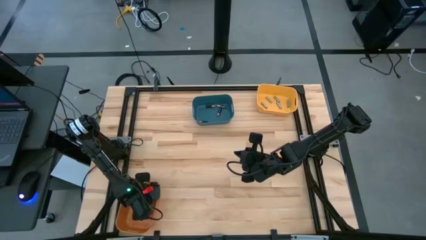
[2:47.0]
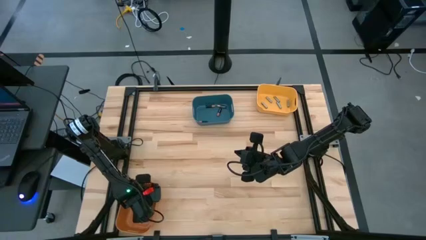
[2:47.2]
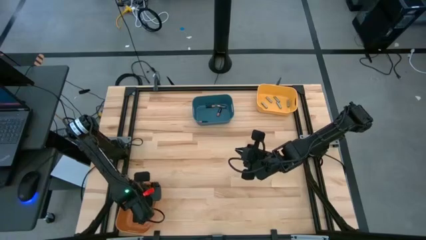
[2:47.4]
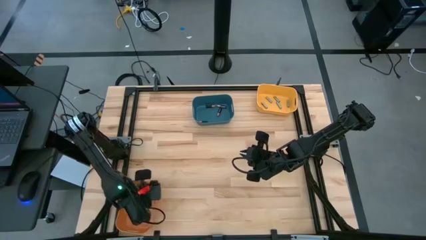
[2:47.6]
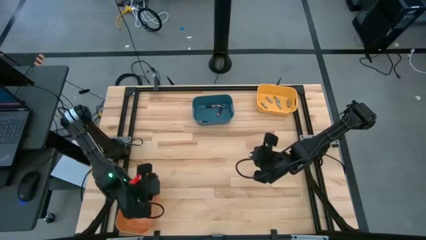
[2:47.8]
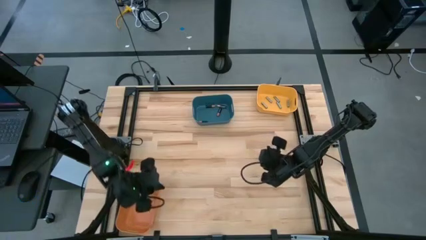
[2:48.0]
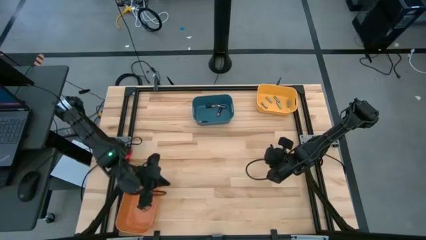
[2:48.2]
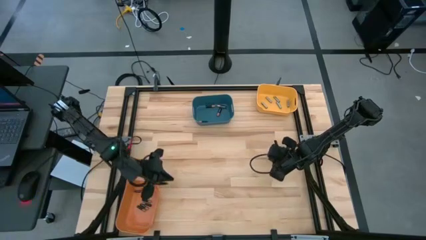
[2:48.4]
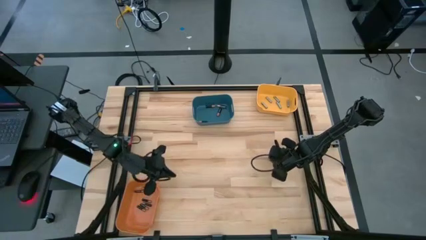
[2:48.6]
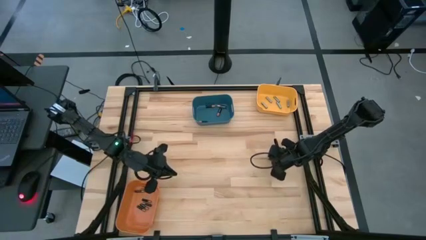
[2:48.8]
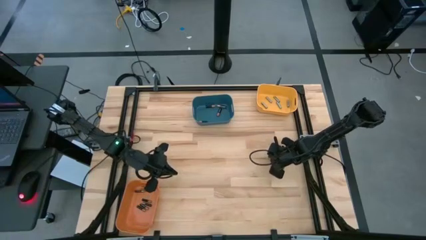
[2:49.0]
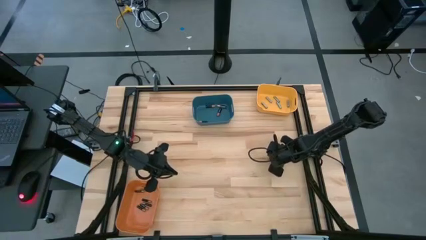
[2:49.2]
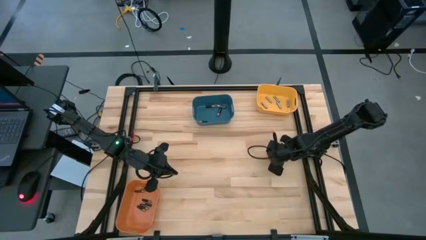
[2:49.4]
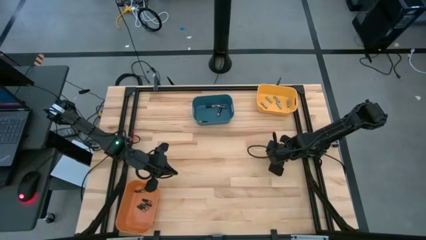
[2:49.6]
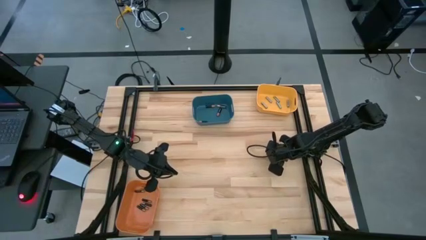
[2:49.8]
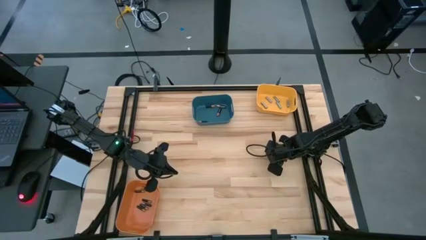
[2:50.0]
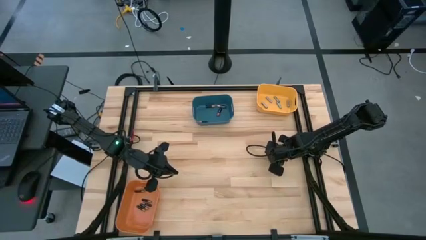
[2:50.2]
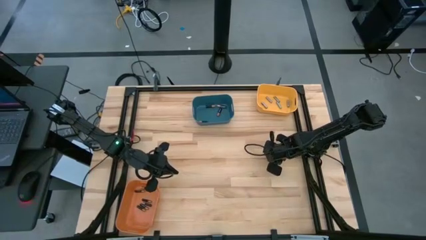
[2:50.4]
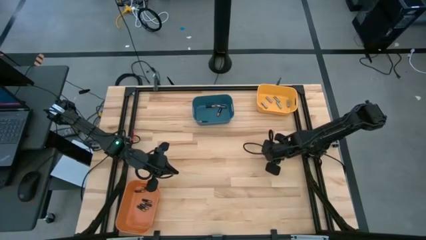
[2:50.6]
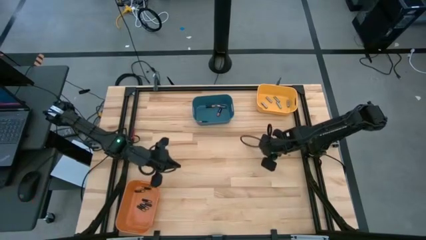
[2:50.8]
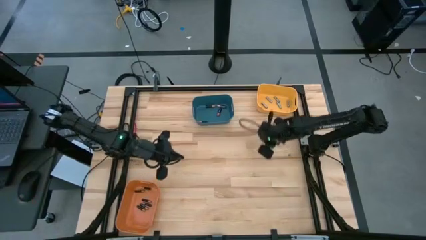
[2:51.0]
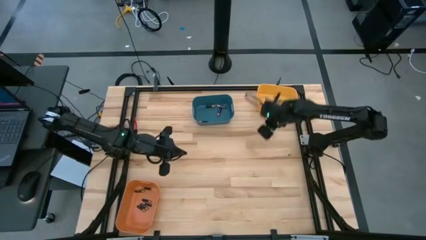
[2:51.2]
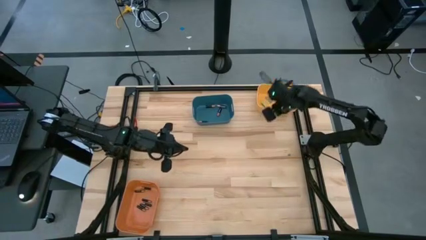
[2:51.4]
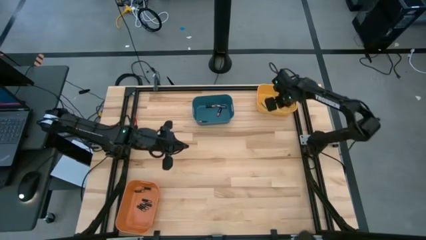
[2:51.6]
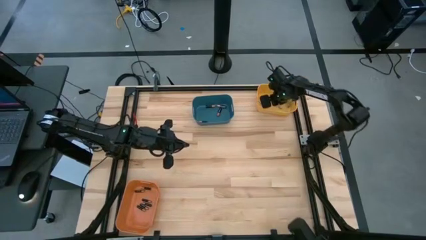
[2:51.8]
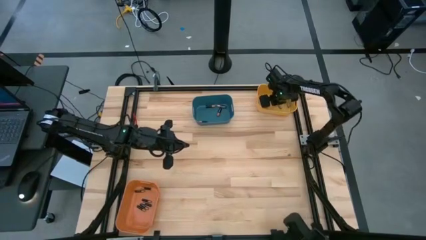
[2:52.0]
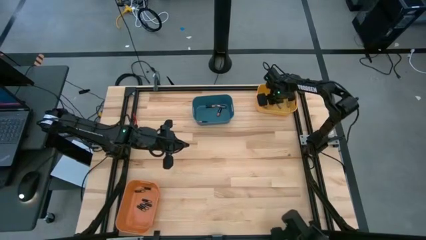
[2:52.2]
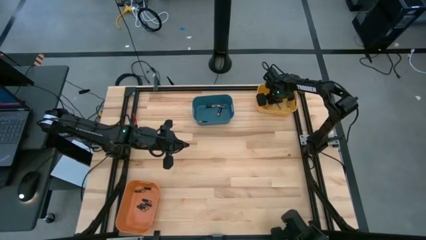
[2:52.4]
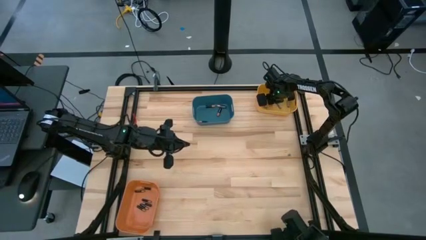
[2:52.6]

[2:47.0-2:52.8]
Task: Sort batteries
Put the white battery into the yellow bin

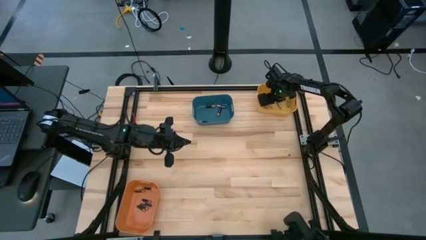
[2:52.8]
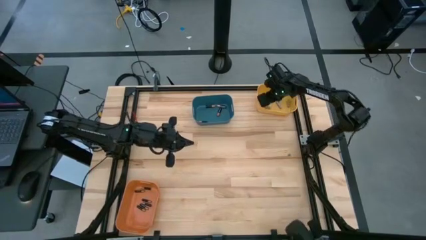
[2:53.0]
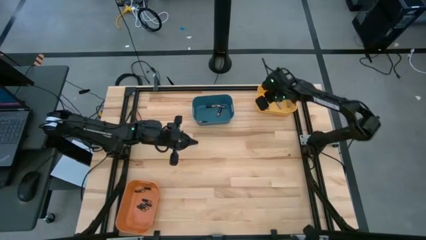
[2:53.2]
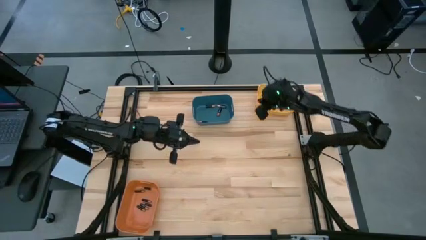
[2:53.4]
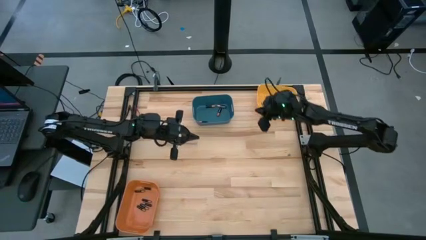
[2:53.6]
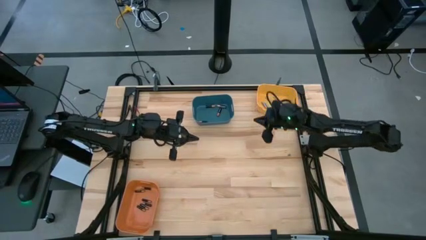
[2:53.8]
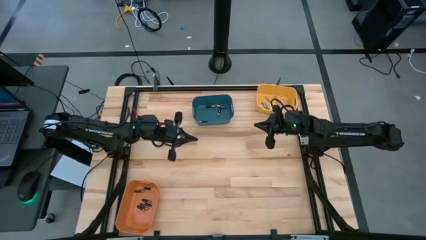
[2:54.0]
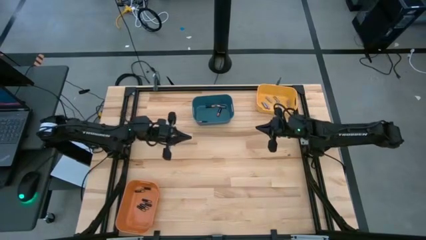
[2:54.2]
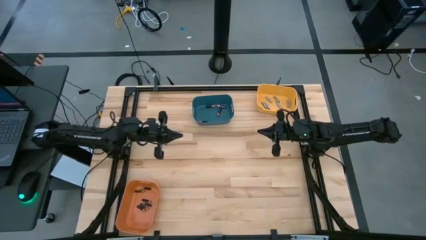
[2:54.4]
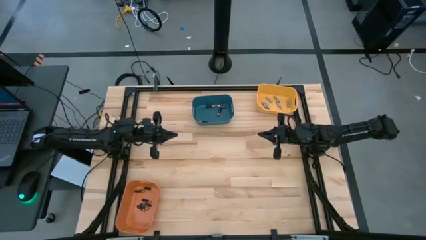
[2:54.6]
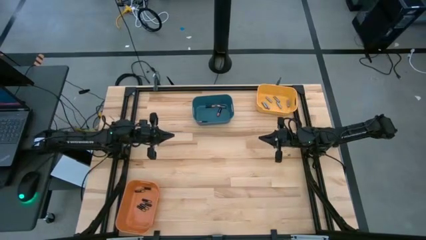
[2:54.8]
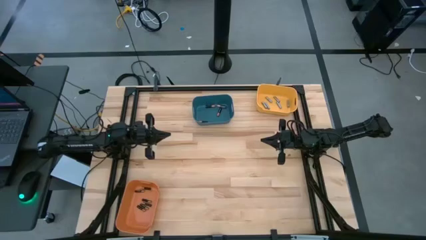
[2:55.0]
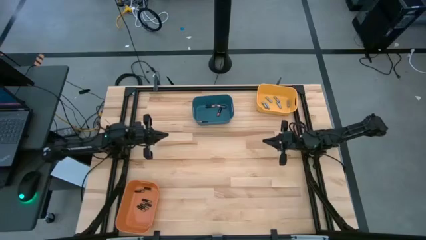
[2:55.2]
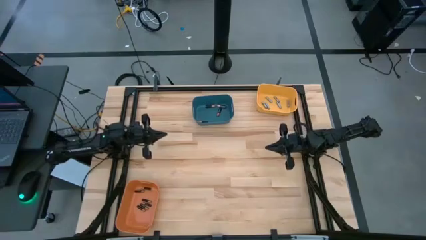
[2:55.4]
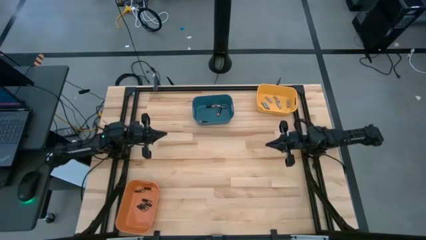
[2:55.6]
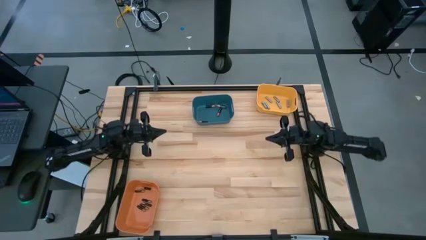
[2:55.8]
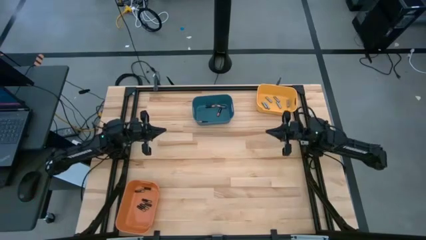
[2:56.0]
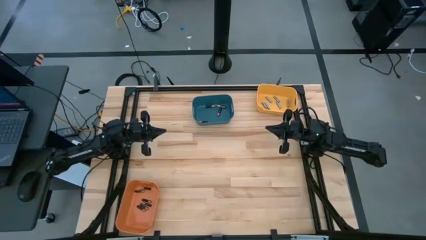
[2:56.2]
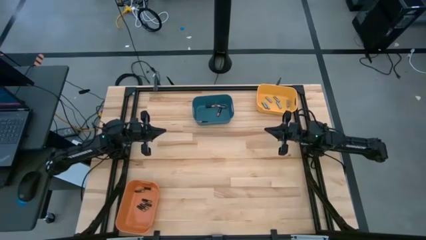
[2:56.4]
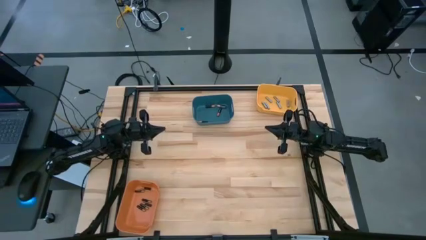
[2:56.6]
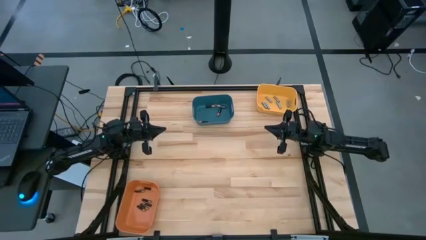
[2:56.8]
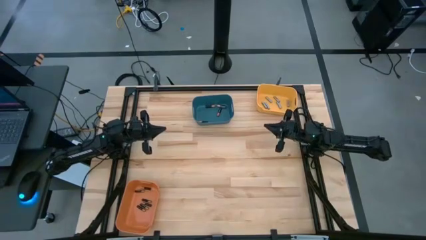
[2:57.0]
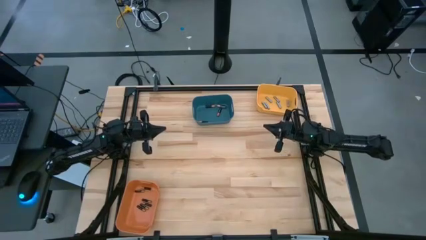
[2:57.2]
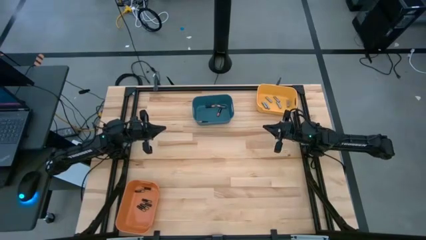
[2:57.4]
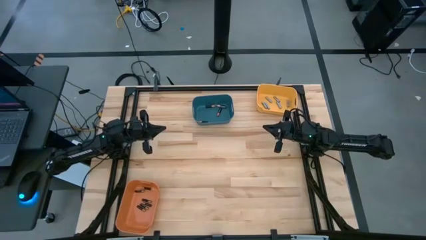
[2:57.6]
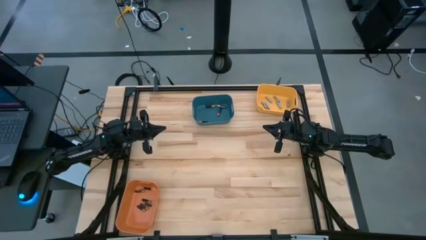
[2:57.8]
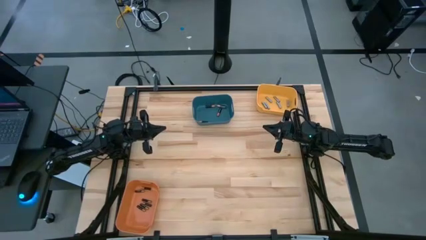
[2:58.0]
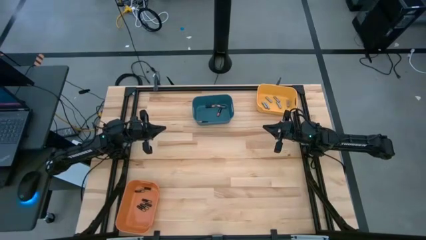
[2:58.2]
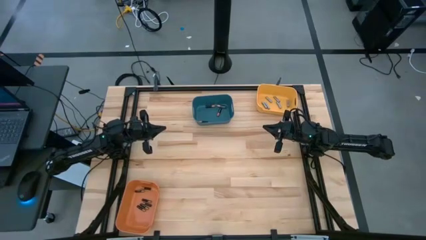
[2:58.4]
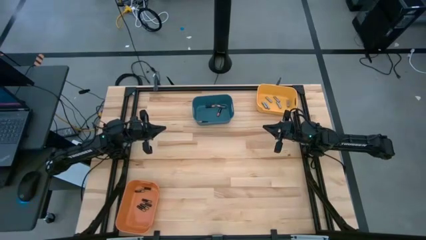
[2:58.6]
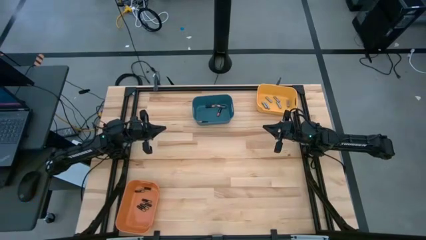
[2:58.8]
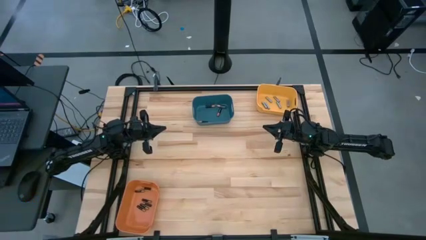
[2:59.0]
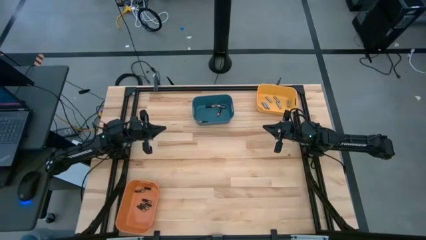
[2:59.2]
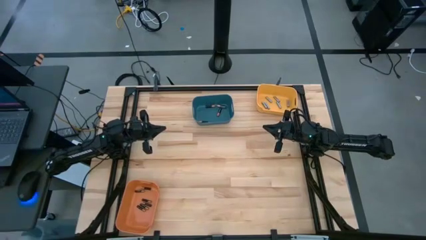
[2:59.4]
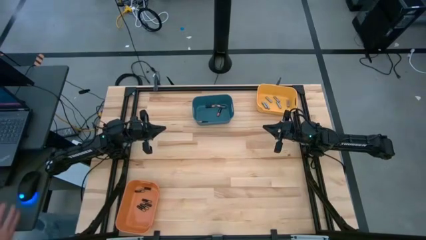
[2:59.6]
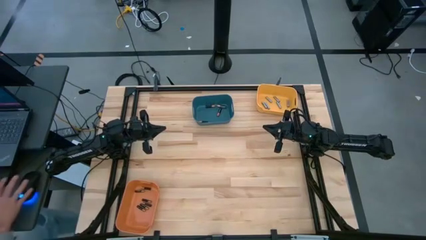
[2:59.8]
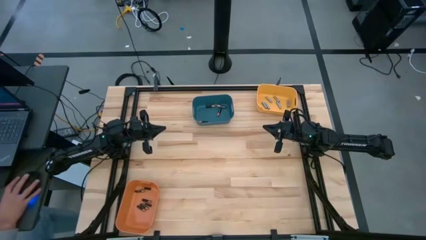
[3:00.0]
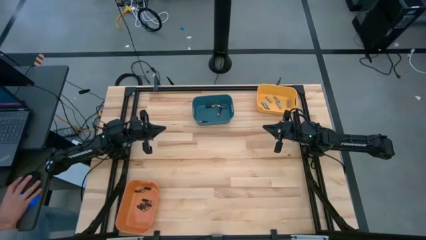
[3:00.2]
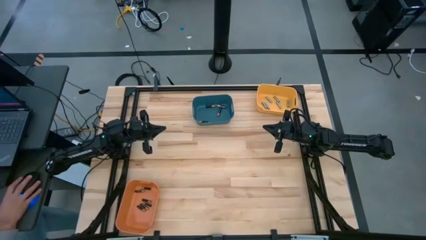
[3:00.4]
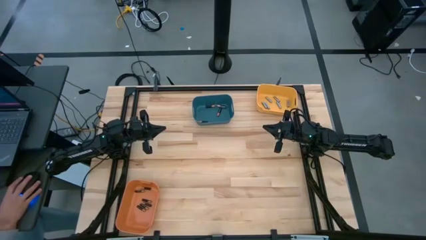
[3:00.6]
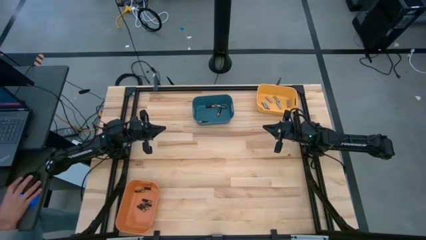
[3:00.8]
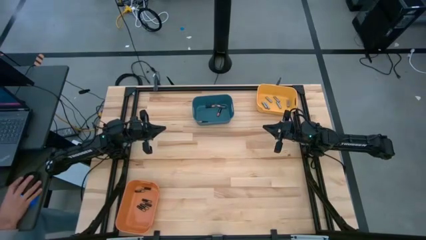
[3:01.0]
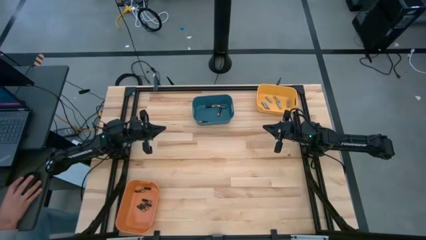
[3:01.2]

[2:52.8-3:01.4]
Return to Home Position

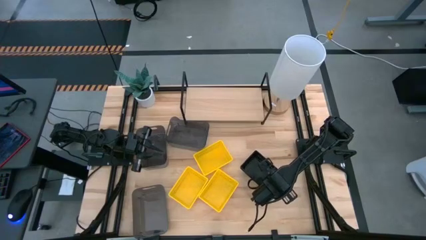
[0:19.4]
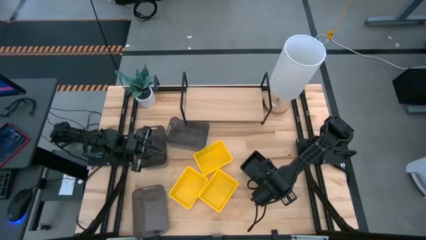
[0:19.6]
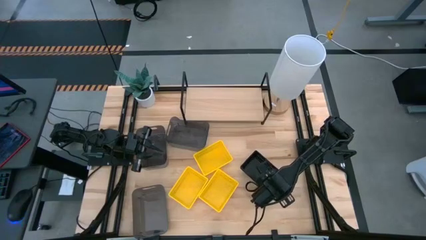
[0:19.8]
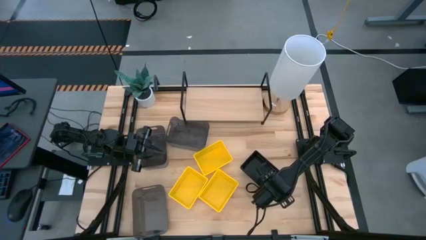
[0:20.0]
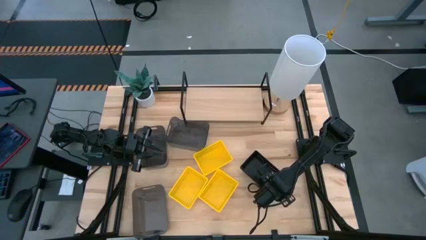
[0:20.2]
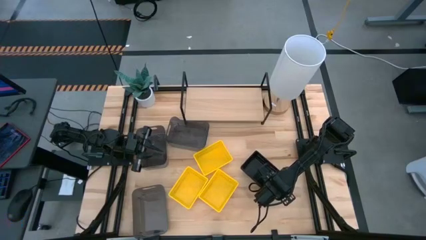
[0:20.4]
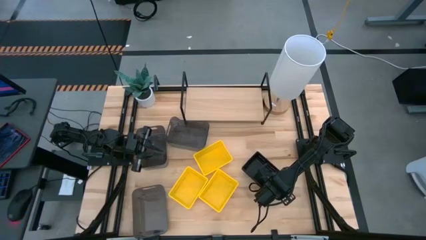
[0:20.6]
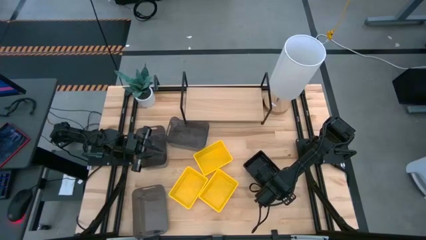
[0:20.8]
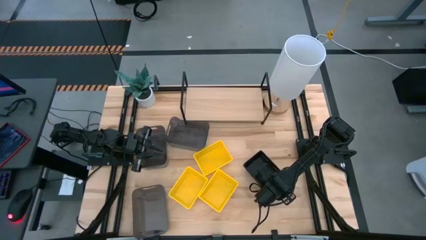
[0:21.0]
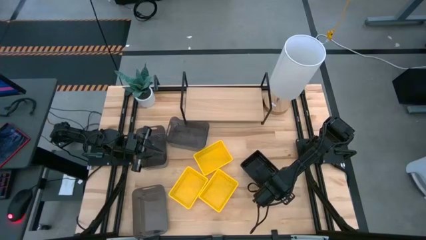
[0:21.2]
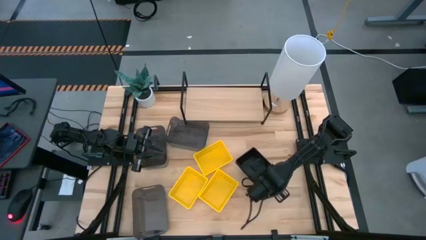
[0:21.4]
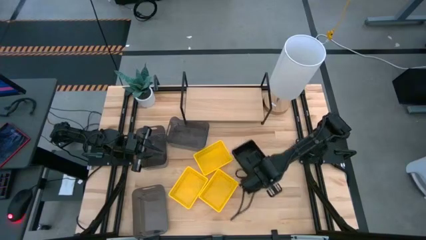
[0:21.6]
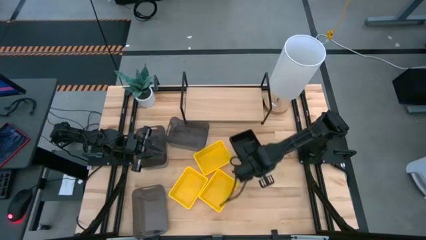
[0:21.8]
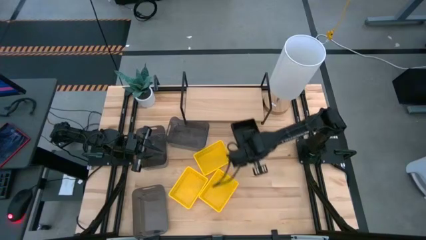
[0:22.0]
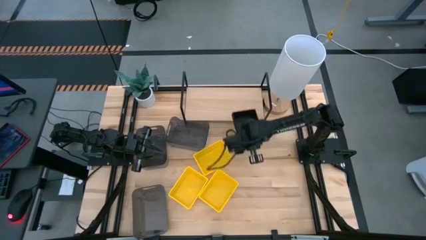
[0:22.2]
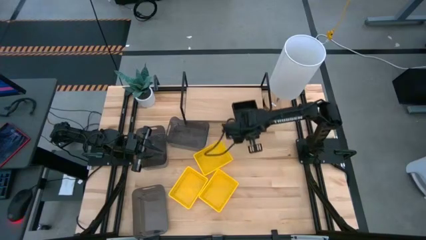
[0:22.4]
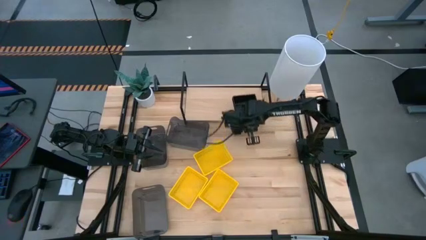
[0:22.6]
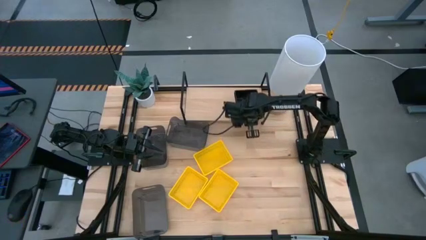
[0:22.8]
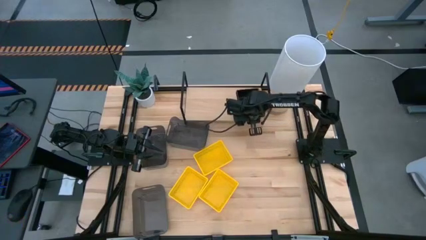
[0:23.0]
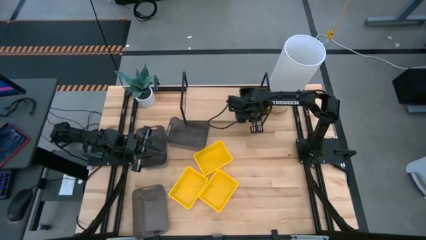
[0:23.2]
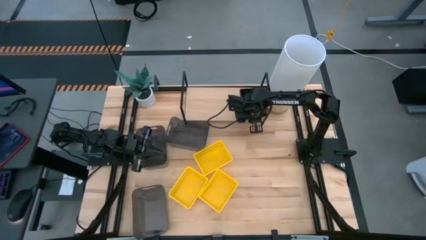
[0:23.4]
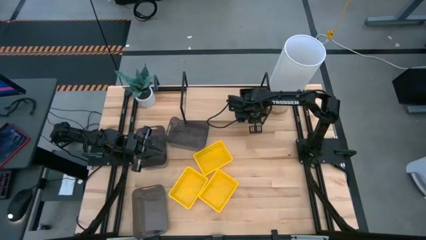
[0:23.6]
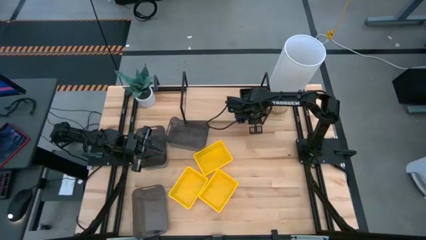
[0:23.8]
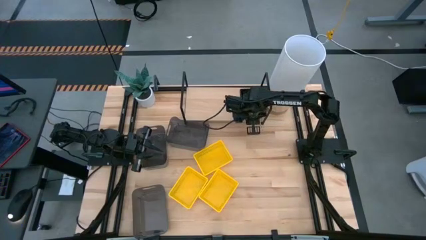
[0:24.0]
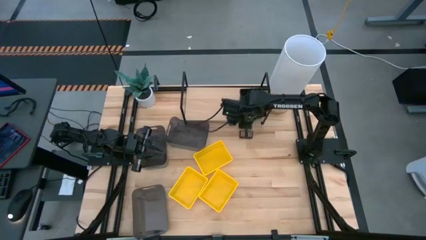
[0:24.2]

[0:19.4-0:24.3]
Task: Stack baskets on shelf by color
Put the stacked black bins on the shelf
